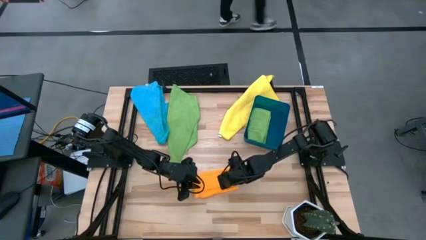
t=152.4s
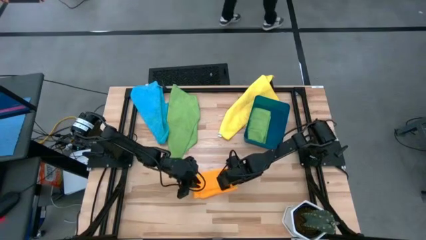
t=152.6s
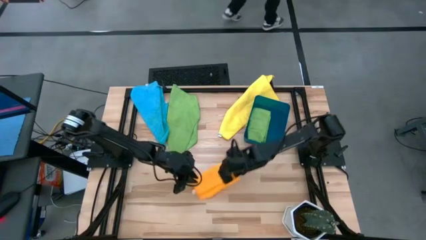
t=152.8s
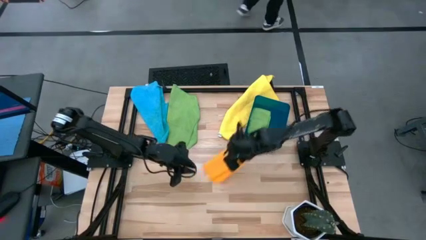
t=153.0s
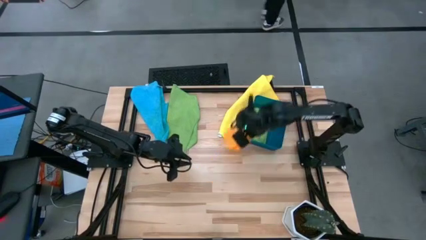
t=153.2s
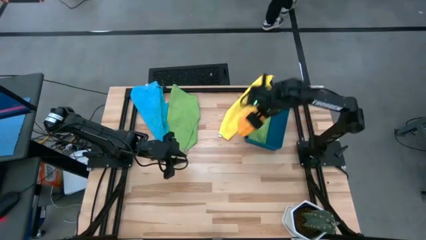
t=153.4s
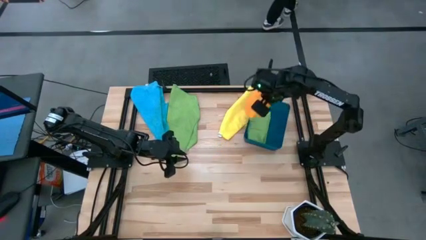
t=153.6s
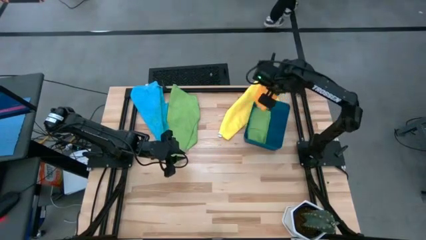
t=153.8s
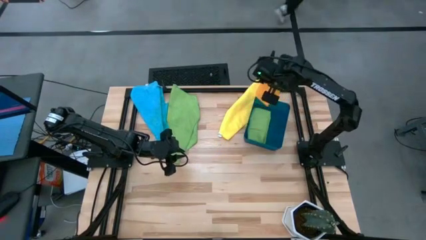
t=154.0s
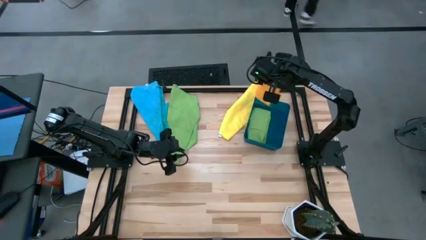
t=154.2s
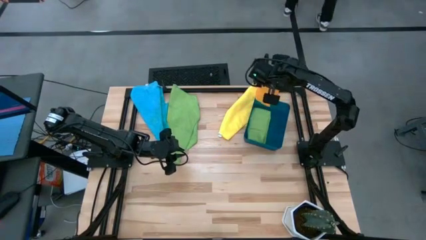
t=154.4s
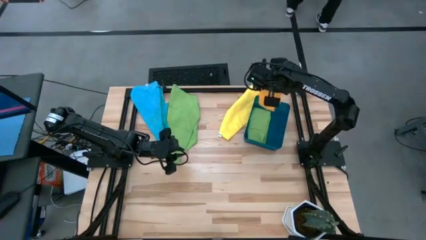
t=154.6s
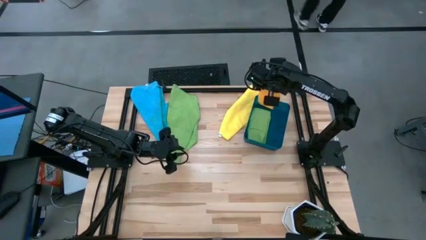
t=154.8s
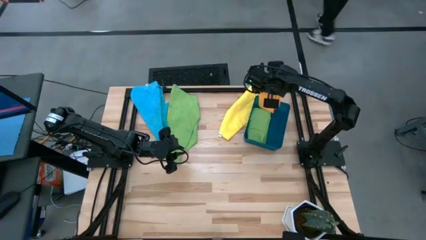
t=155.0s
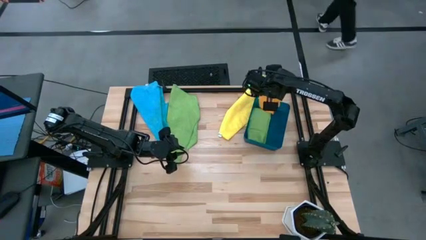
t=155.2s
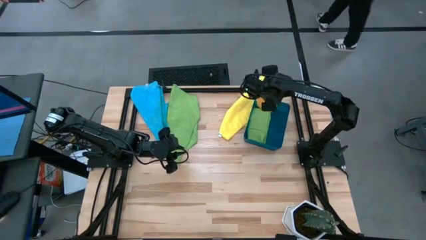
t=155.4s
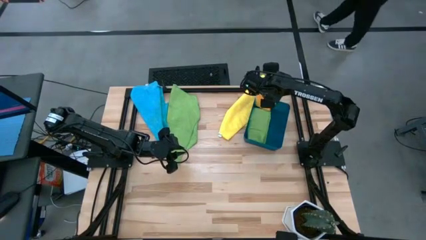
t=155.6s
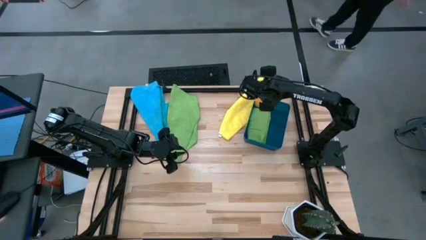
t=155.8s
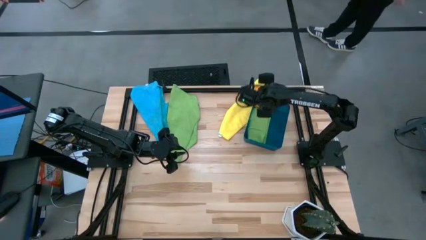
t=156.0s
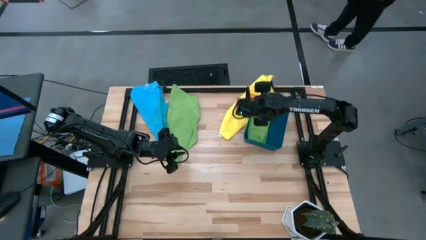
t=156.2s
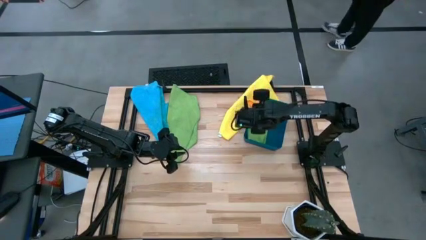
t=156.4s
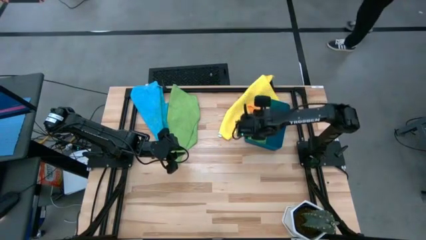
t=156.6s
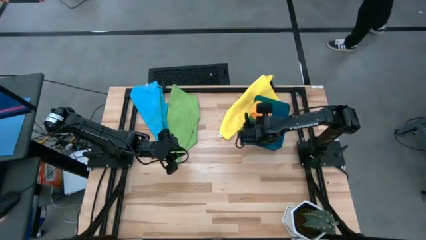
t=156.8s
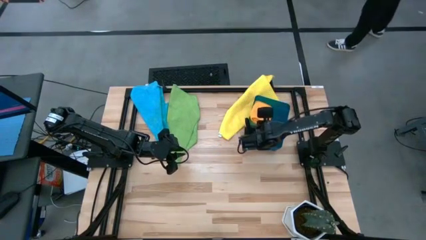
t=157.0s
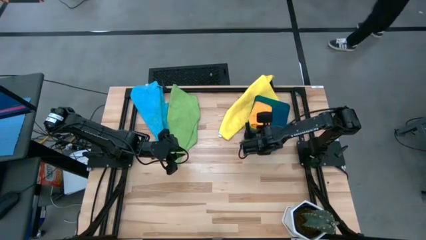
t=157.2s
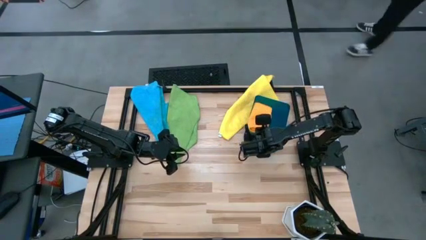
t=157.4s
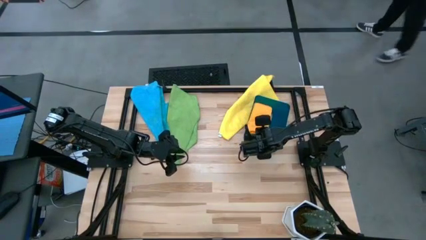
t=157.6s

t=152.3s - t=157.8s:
Task: Fold microfiber towels
Put the orange microfiber cloth into the blue bin

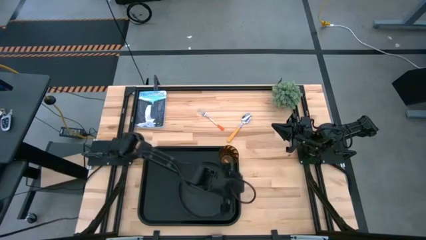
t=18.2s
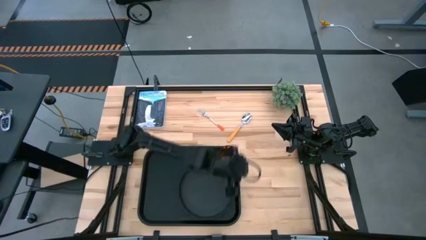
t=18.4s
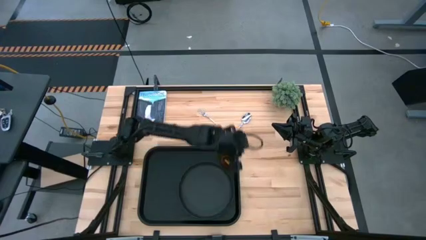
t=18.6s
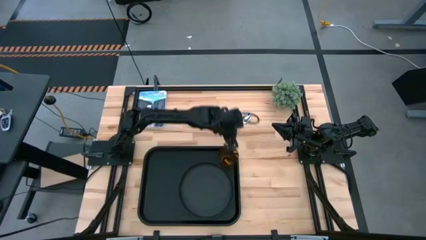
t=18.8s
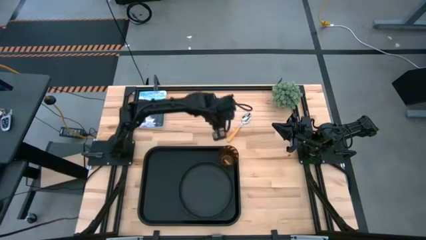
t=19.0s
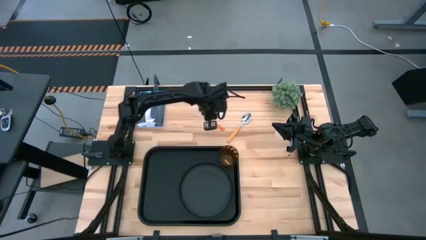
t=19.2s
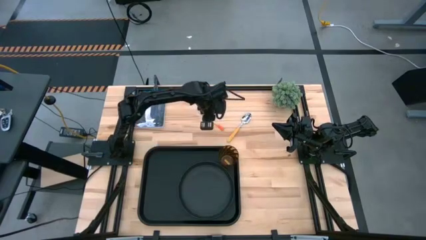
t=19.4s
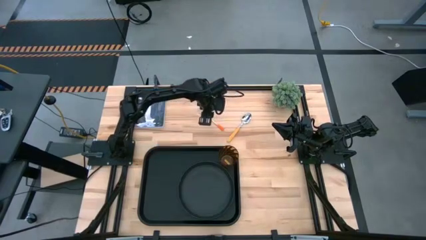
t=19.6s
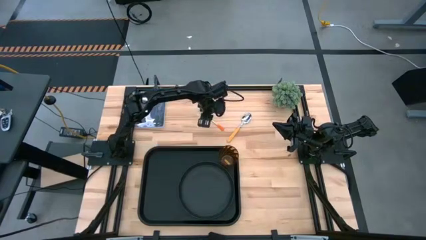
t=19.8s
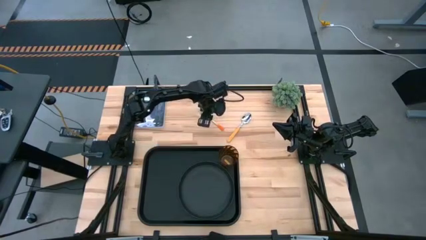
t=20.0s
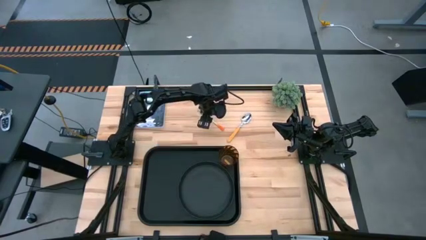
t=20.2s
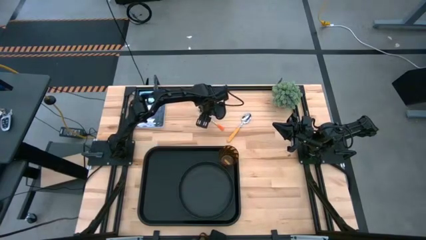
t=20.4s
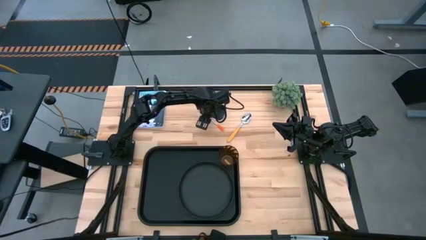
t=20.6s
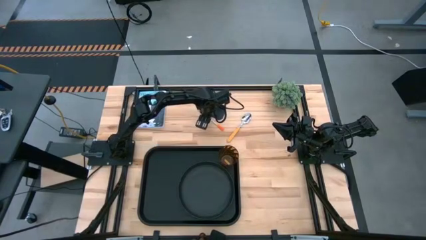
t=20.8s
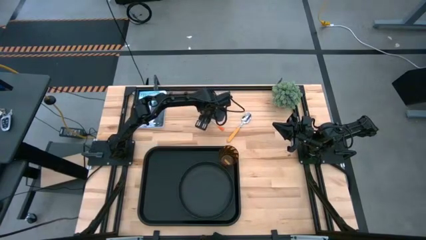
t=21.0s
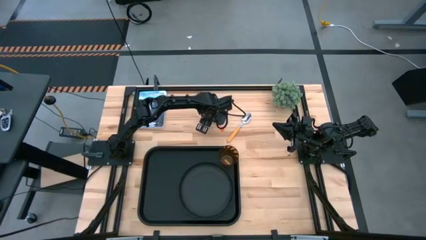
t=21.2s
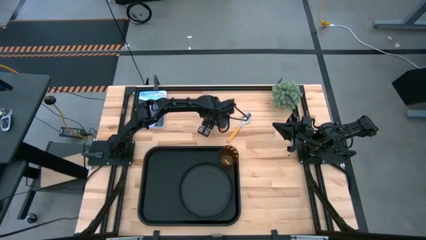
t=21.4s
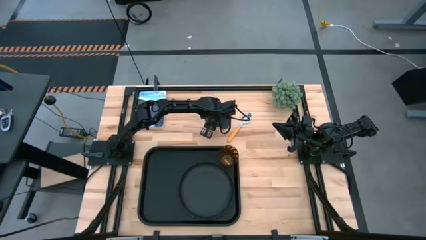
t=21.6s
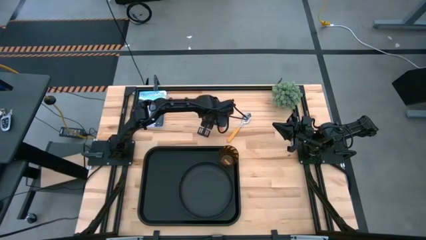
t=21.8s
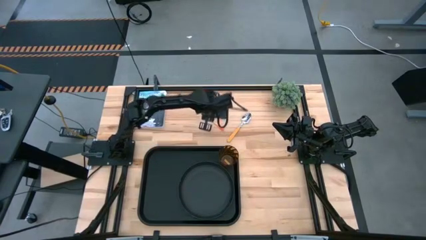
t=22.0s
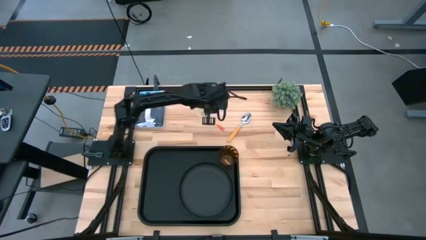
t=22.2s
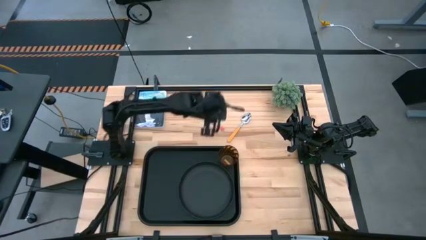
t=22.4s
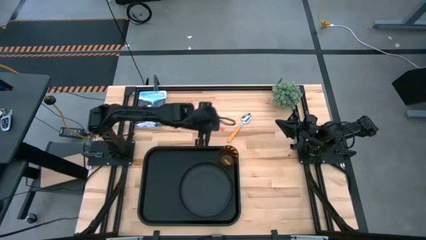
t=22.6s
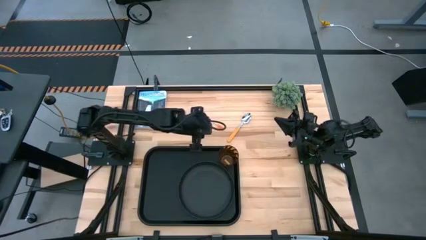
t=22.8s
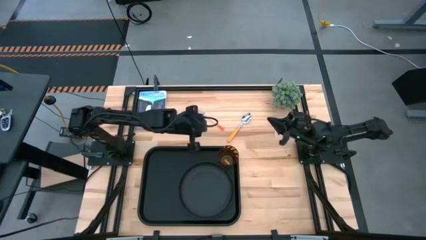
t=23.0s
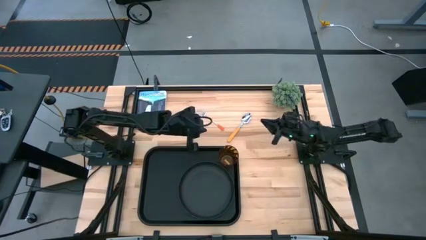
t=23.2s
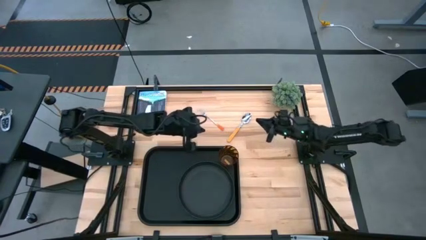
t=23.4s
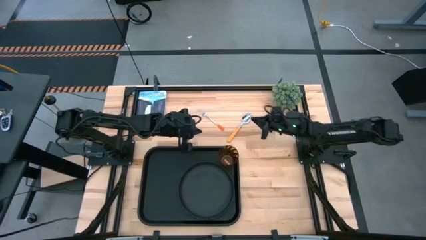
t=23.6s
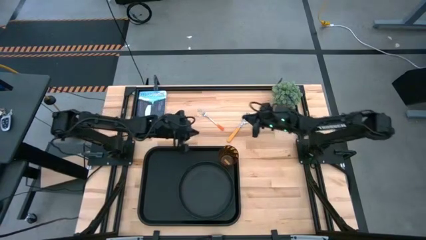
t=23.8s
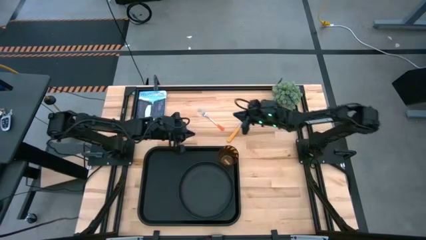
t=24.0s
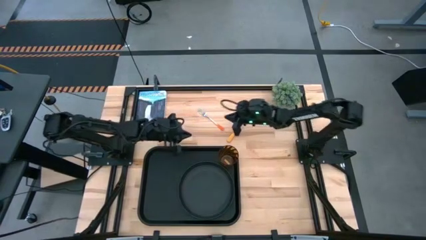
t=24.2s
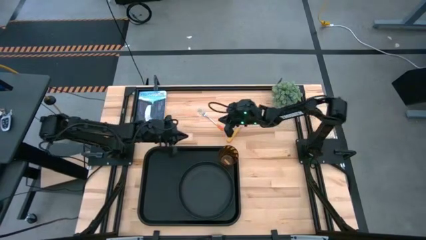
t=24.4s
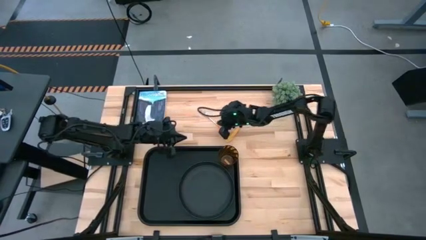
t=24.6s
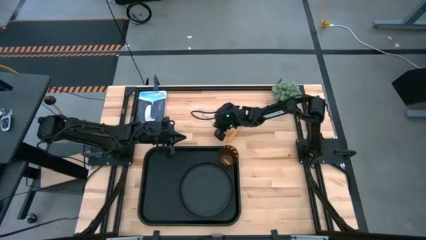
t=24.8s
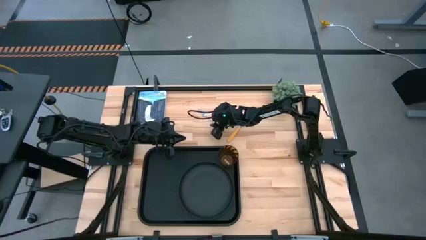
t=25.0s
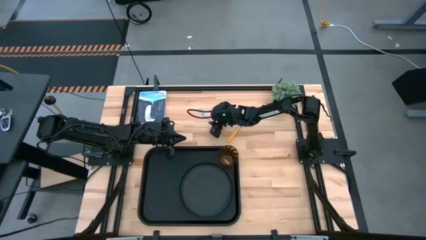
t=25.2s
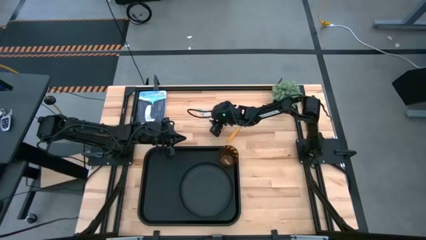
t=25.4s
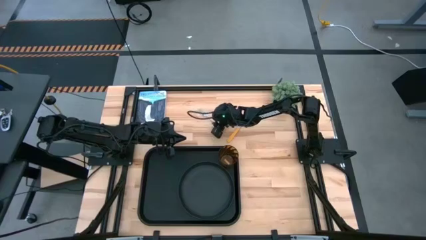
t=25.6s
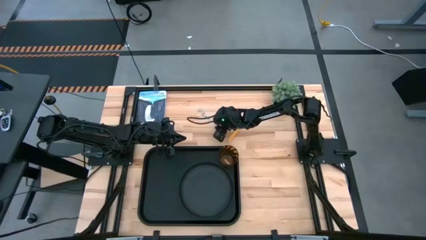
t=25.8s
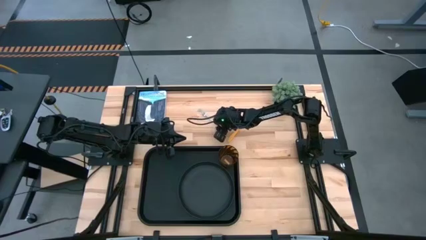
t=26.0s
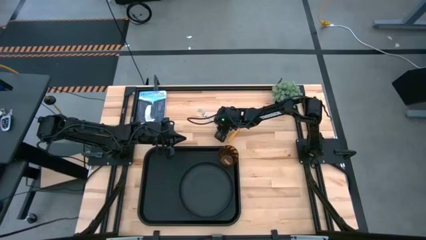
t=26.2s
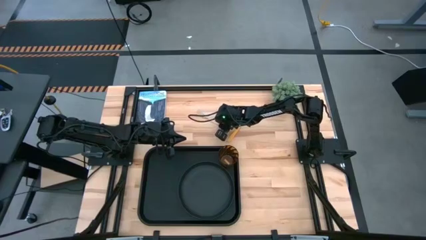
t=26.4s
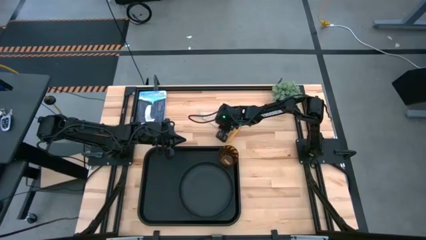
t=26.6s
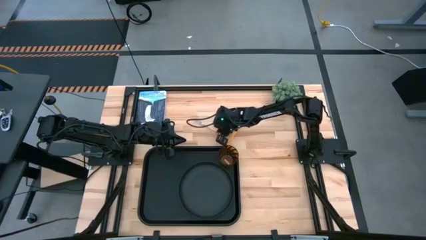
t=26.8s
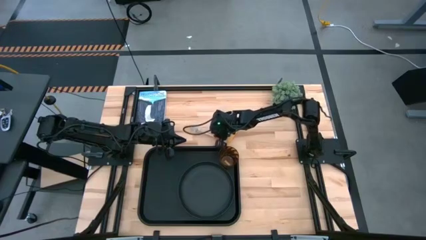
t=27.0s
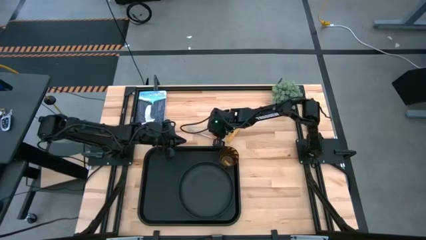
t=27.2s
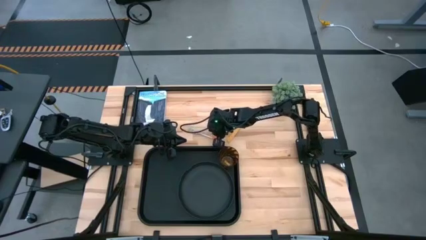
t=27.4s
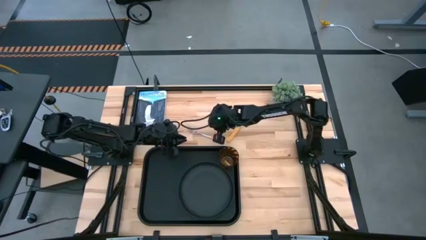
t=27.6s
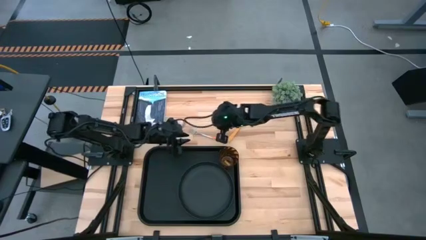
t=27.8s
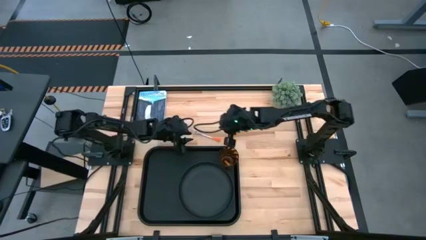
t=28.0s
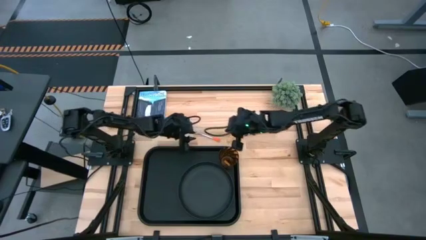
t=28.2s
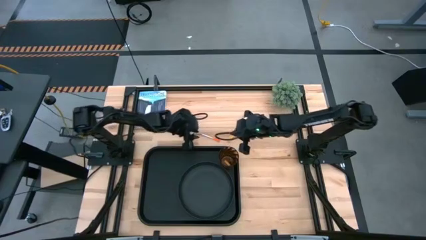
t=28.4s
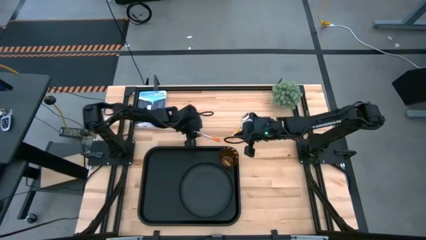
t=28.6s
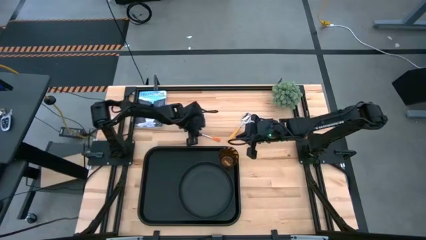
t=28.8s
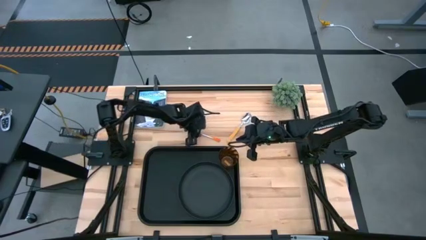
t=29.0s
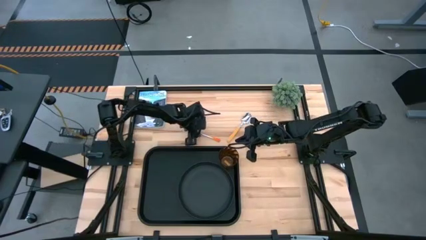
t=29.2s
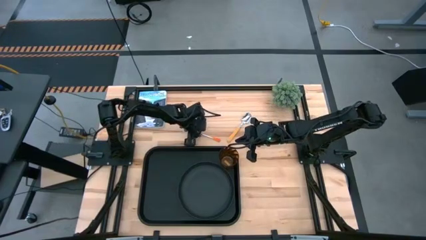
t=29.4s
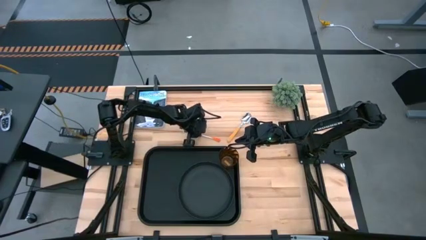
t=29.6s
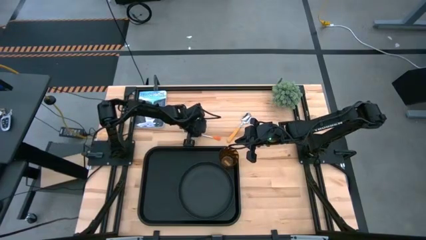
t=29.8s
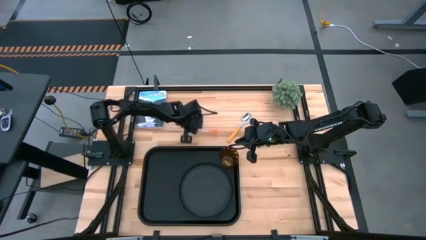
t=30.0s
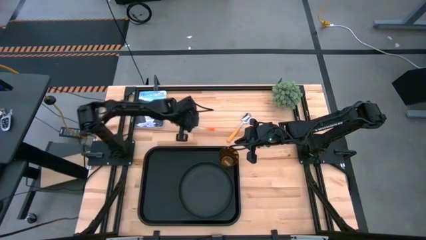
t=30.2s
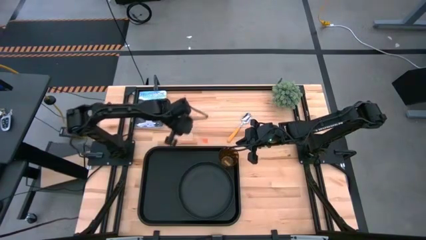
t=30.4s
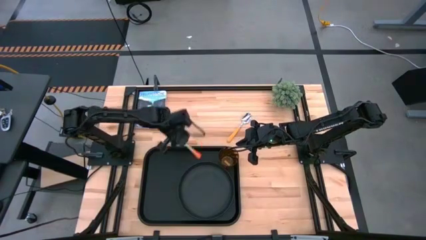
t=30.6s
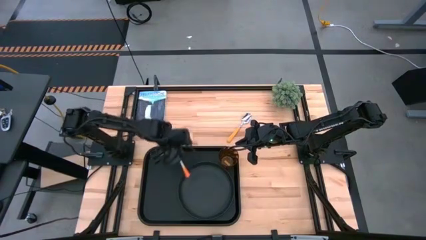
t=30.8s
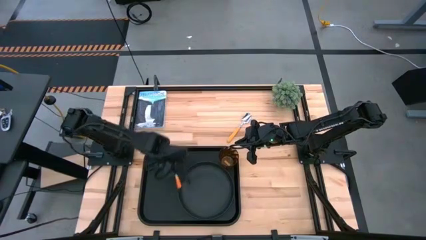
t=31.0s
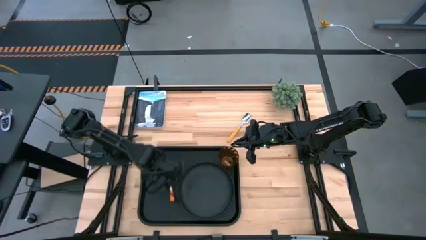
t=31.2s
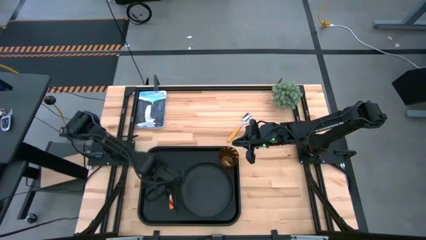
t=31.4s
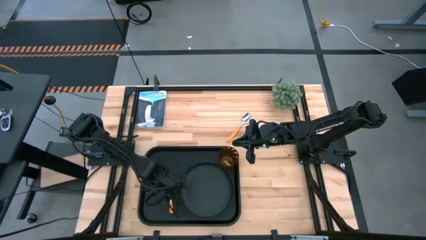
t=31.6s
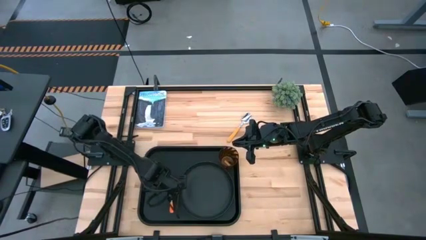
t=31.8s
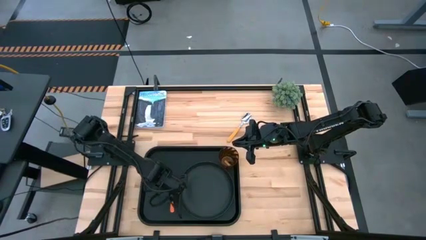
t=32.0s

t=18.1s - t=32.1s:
Task: Pick and place plate/cup/fork/spoon on tray
Put the orange fork on the black tray to the left of the black plate
